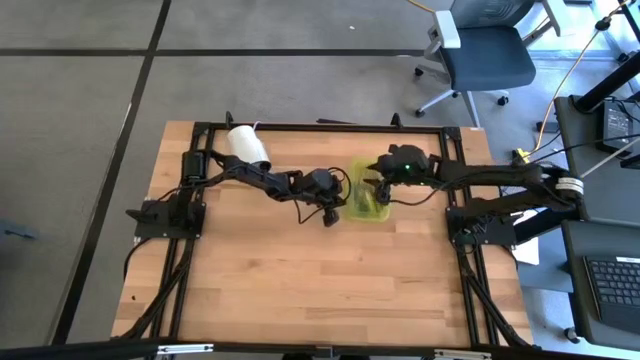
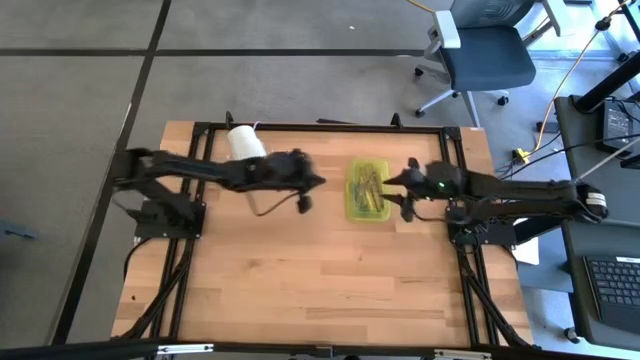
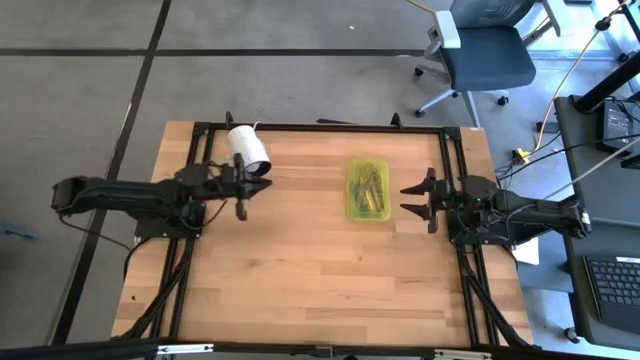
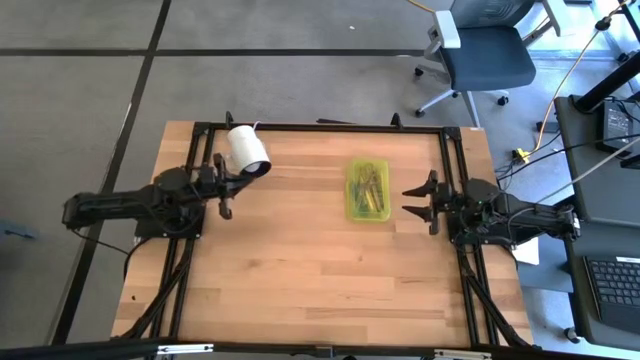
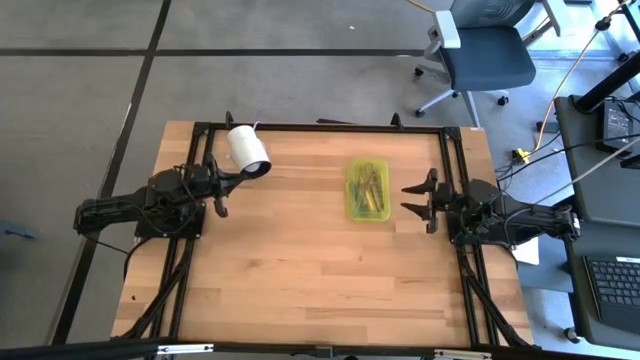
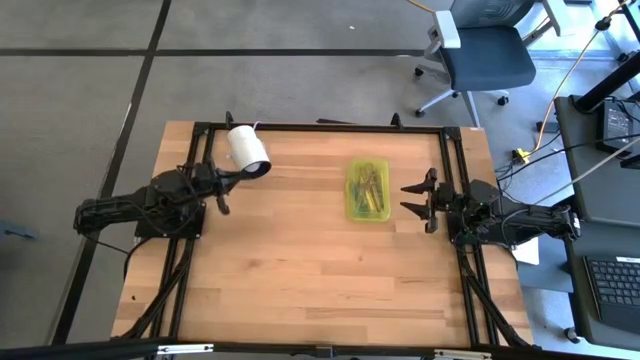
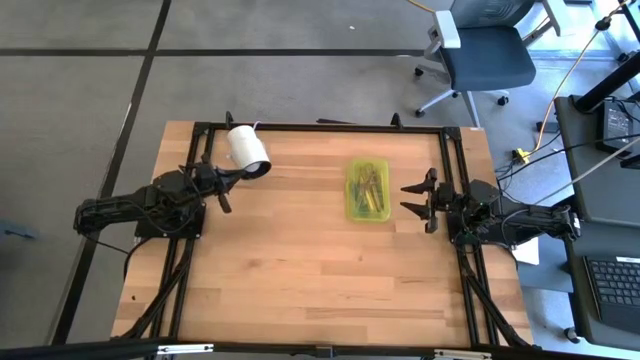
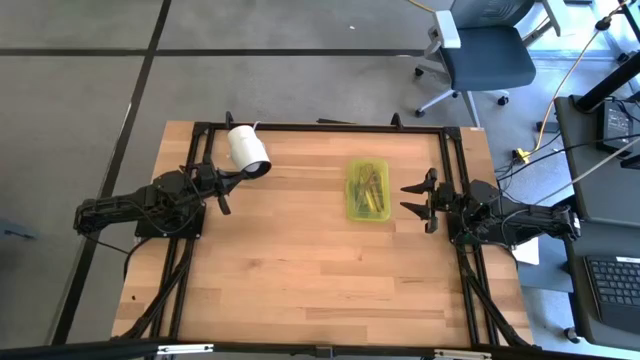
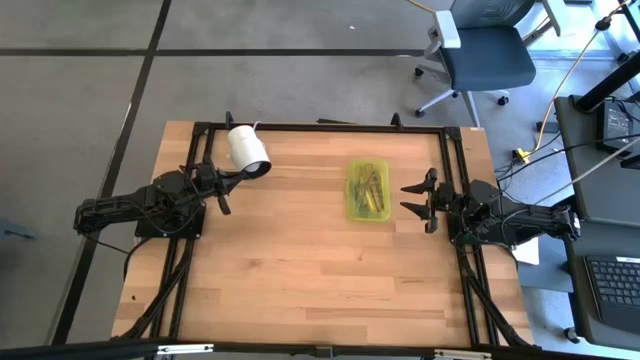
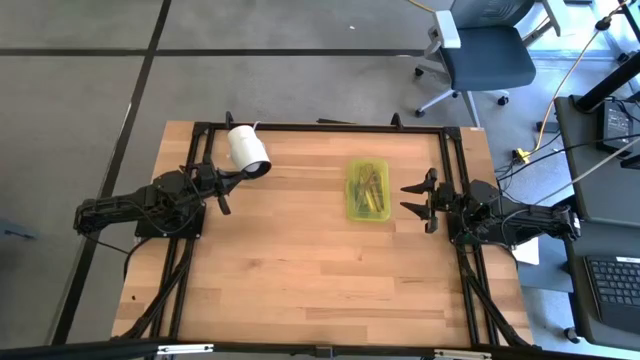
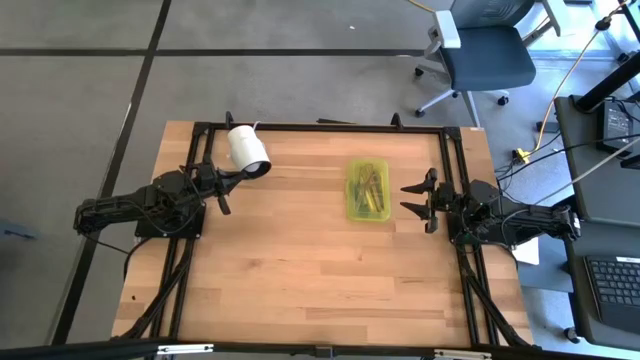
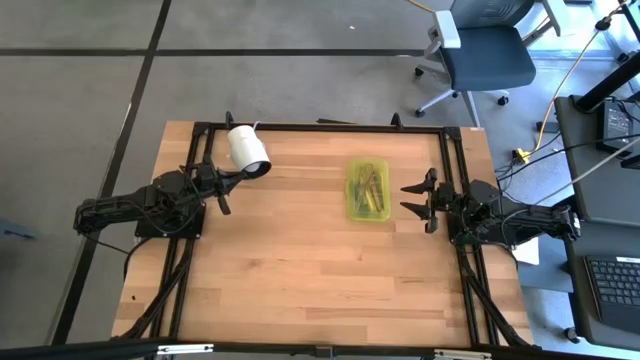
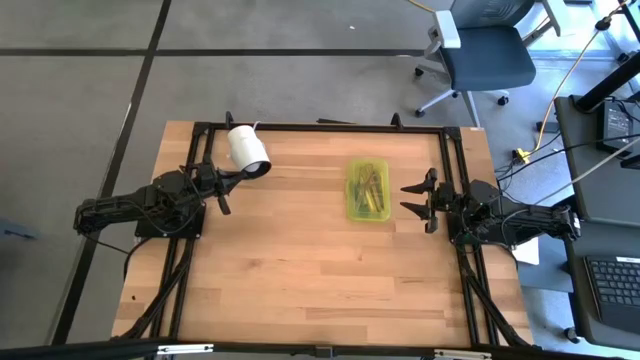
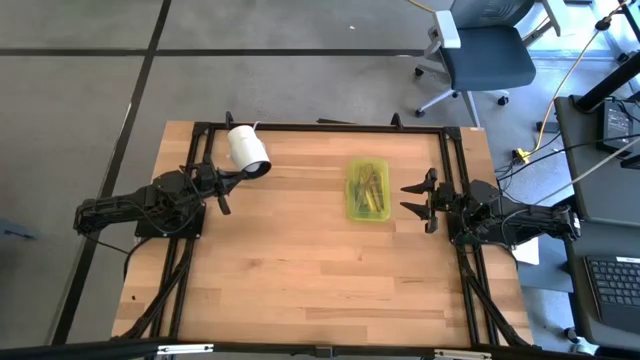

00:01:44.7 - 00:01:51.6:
Task: Pick & place school supplies into a supply box
Return to Home Position
